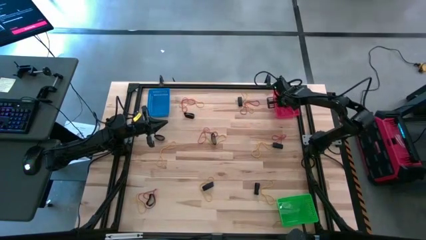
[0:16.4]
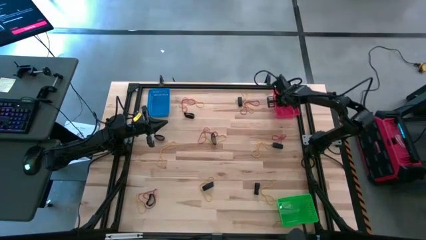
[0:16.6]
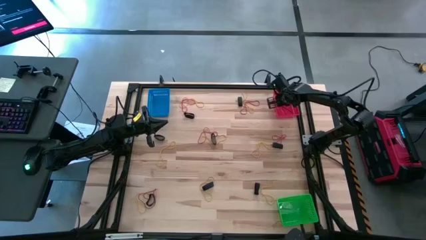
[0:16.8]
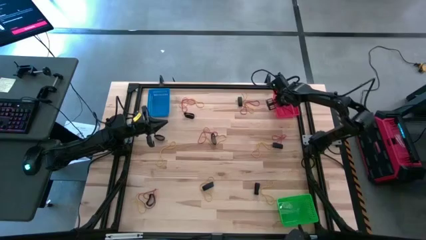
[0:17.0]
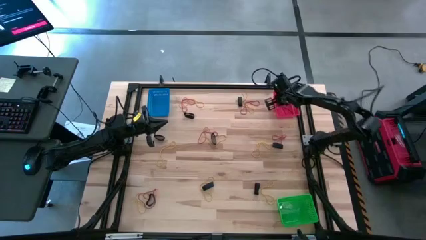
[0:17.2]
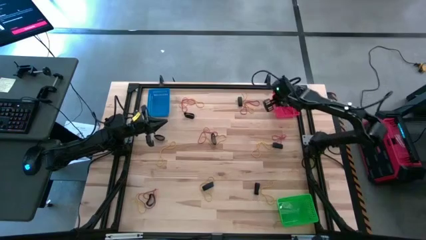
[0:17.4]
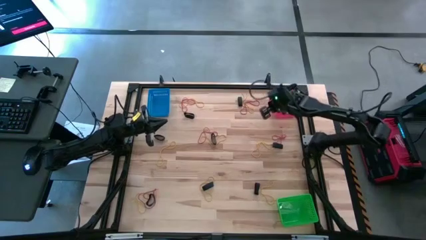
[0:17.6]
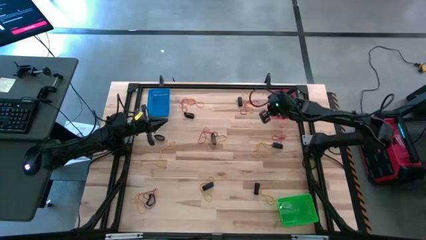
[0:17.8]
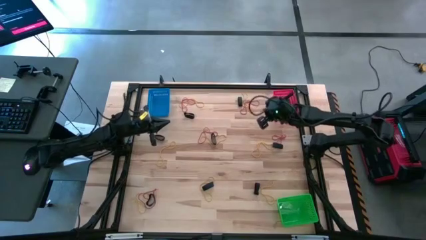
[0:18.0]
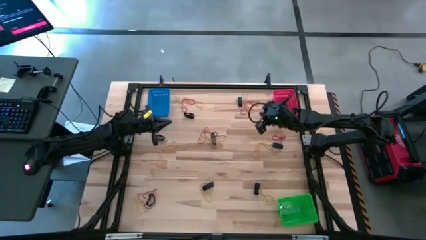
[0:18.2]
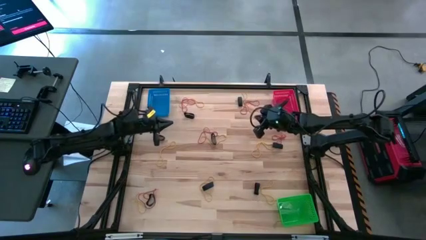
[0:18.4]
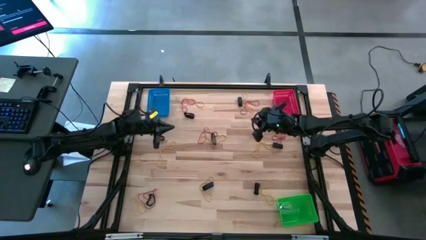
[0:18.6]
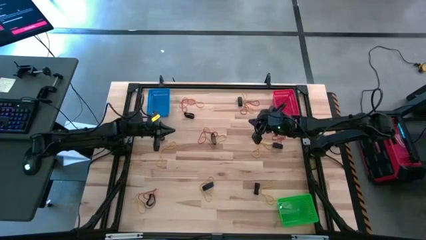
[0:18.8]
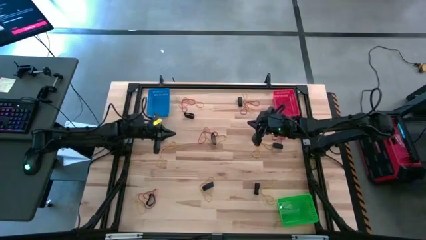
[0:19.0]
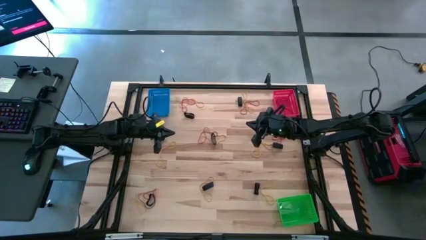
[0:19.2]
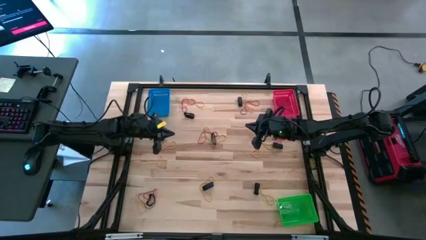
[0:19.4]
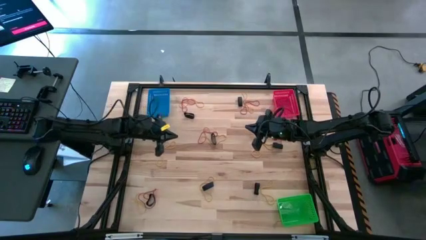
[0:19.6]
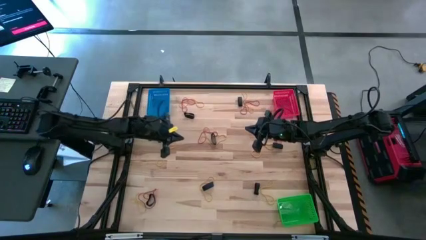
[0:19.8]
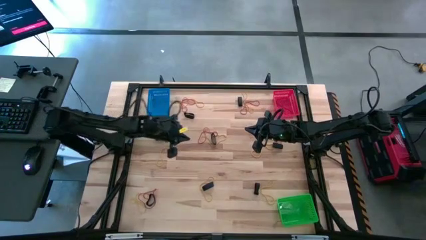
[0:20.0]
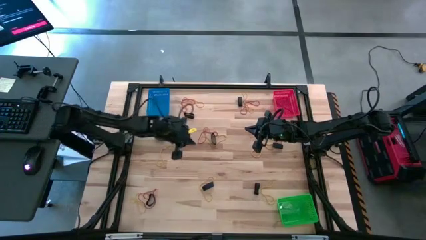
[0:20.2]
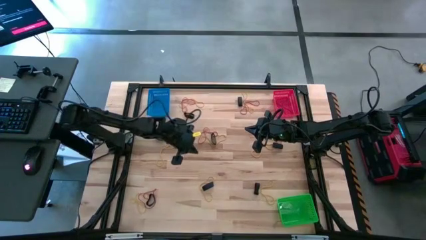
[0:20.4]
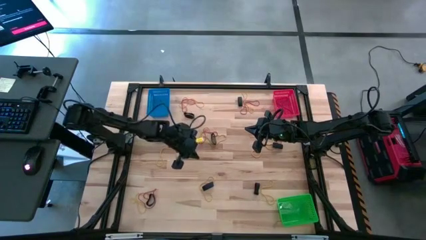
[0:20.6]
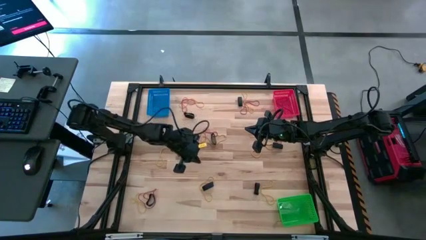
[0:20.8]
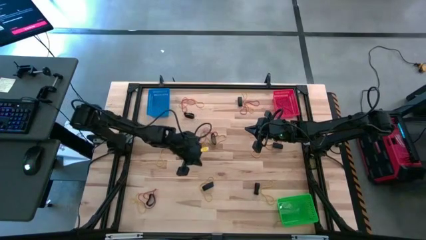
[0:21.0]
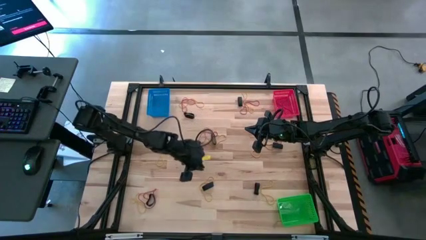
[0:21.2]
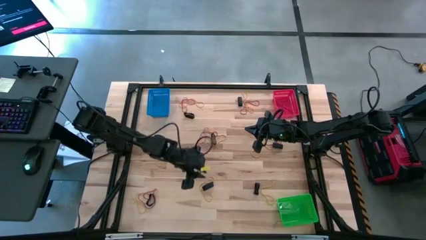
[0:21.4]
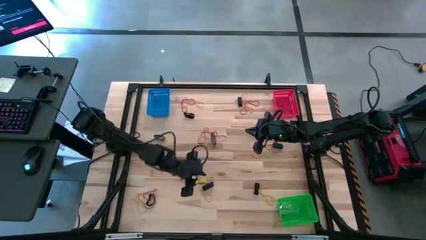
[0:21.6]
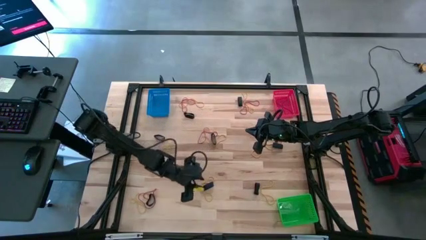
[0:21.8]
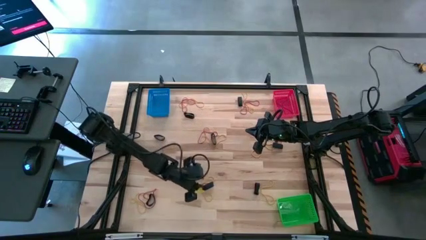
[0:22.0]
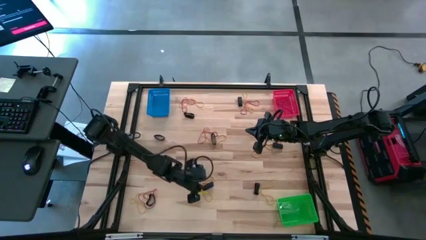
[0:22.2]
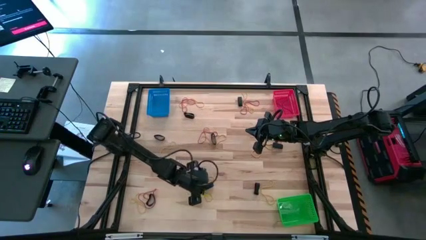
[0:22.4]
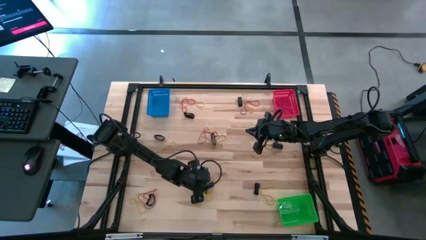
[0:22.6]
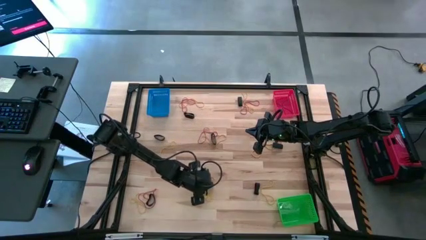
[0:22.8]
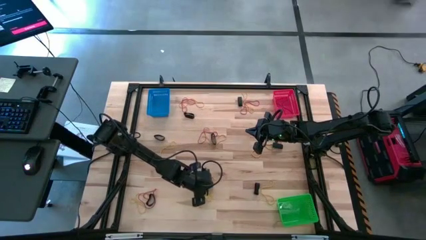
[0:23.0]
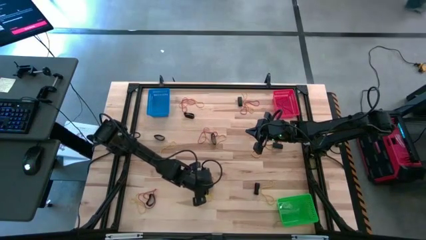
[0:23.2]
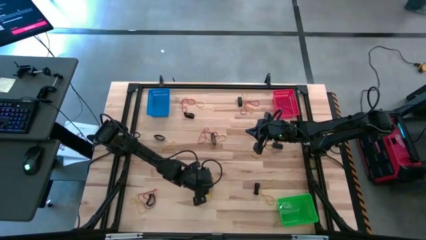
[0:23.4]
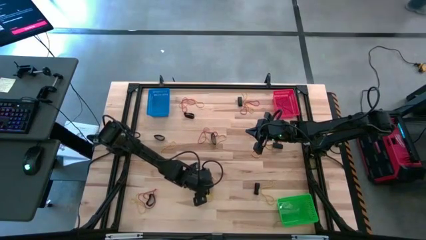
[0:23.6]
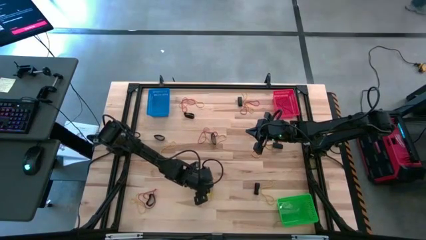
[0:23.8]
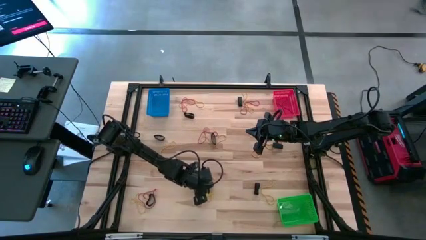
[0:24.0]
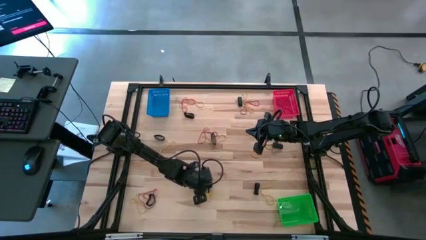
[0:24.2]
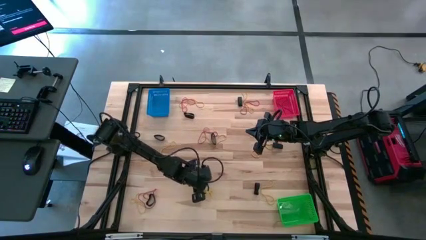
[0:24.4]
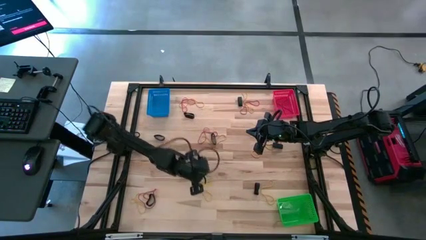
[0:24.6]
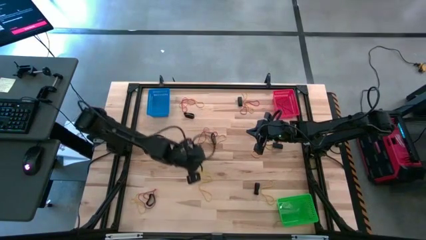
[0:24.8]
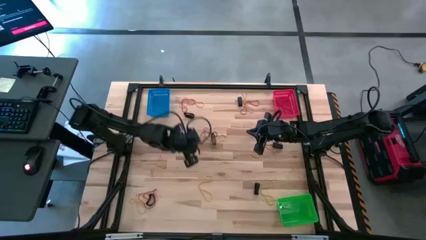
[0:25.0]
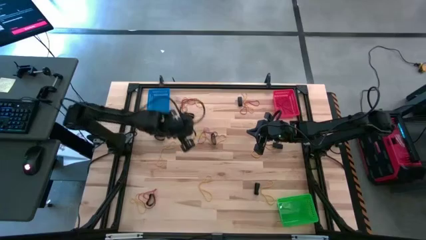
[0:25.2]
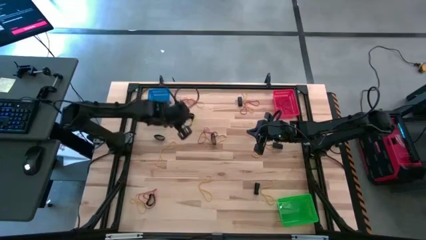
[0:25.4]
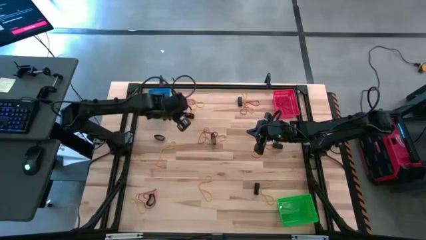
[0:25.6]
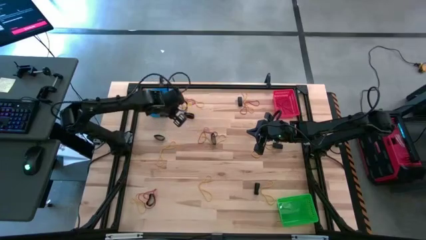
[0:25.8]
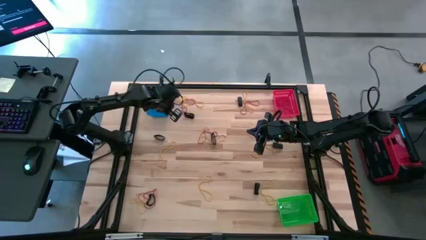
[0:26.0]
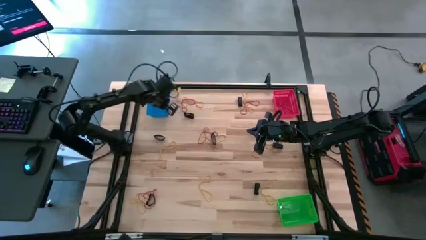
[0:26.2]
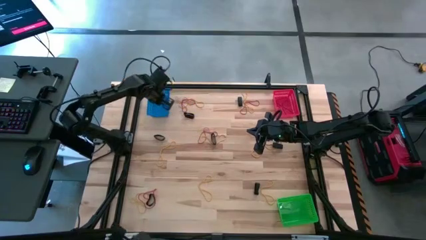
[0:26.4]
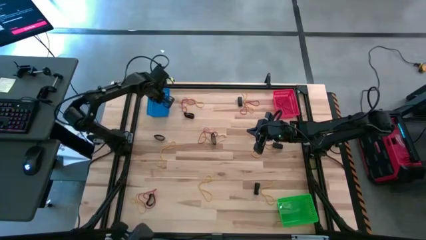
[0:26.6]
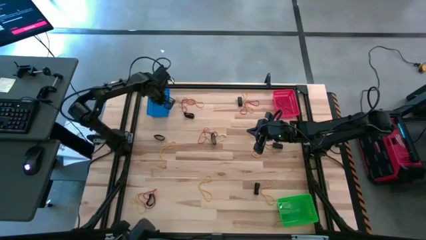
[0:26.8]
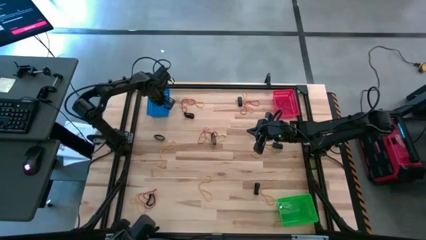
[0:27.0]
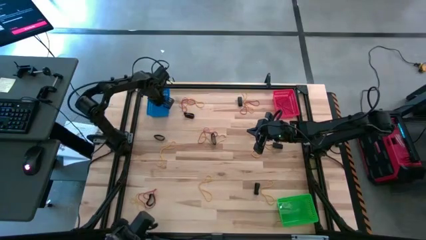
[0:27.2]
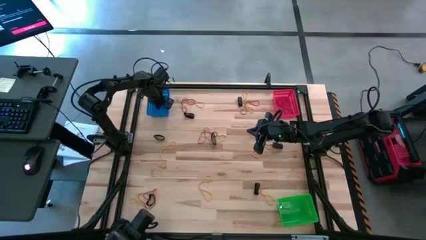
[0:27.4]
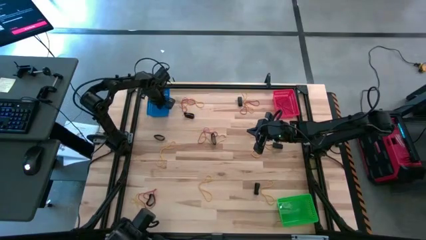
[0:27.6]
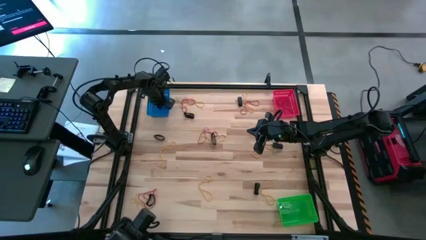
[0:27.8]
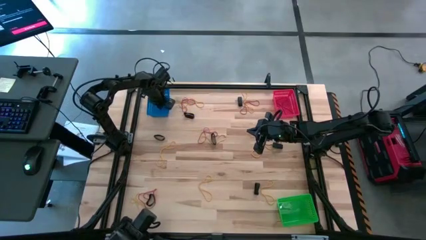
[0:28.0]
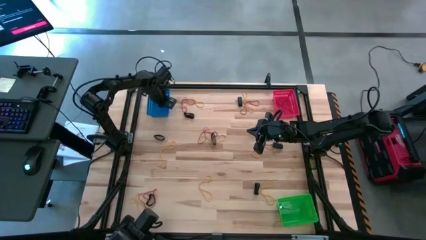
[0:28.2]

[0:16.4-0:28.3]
Task: Sort rubber bands into baskets
Put the black rubber band into the blue bin
